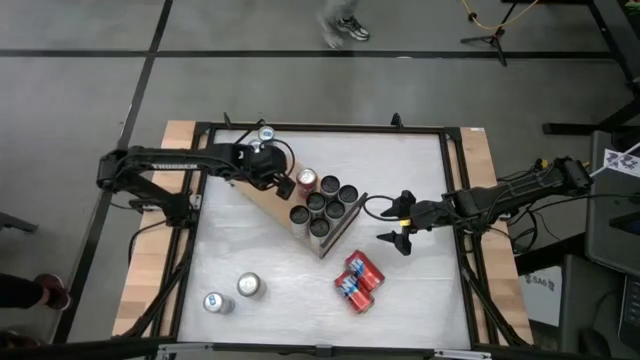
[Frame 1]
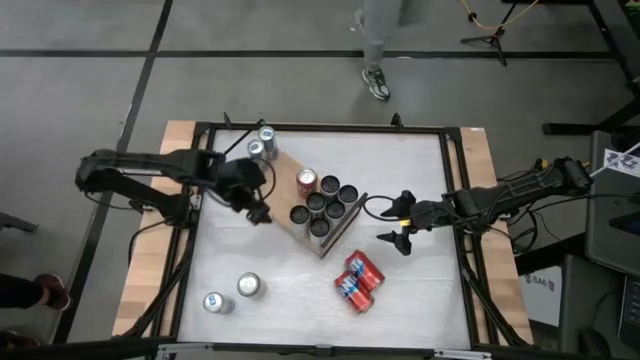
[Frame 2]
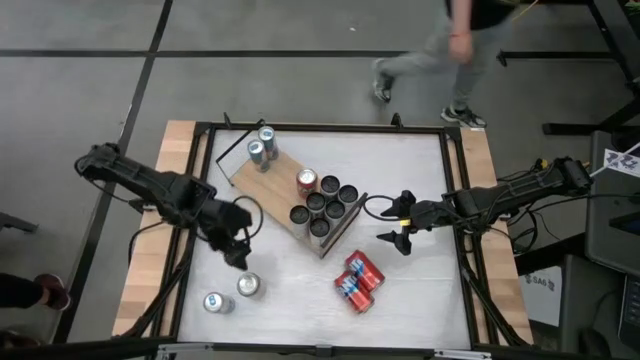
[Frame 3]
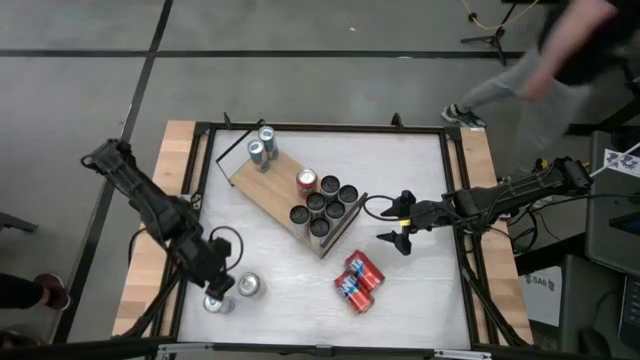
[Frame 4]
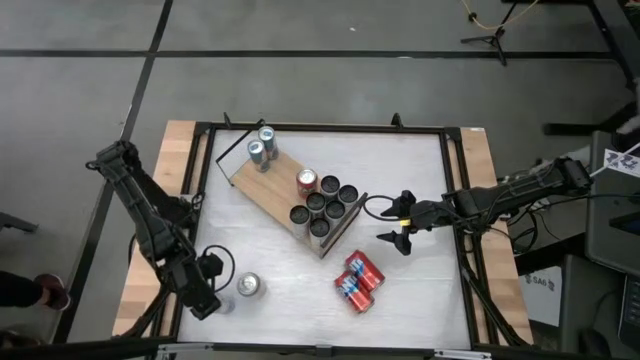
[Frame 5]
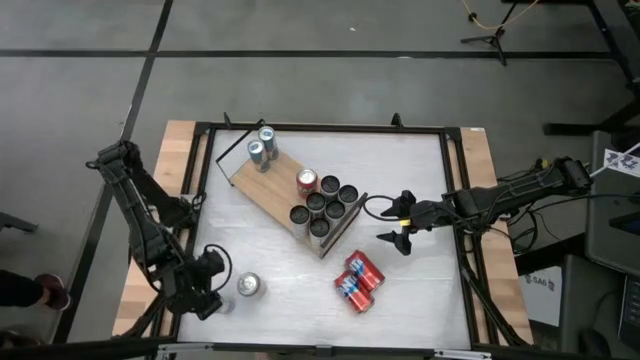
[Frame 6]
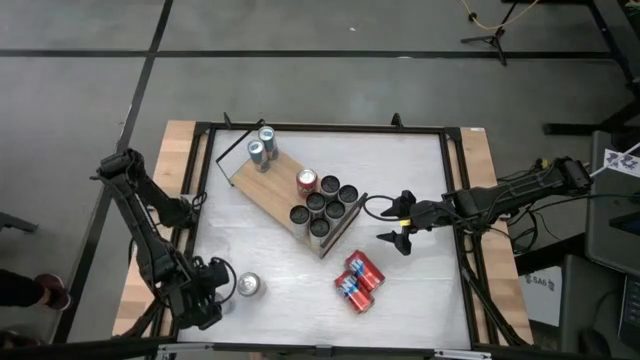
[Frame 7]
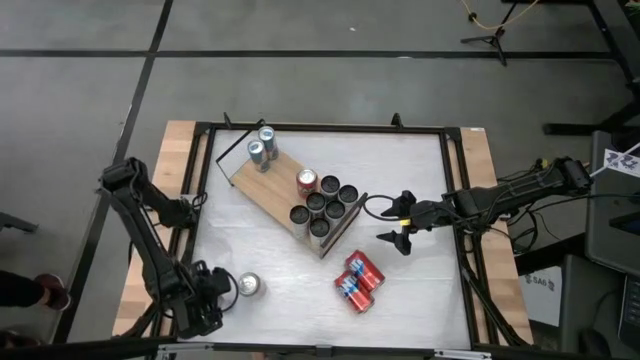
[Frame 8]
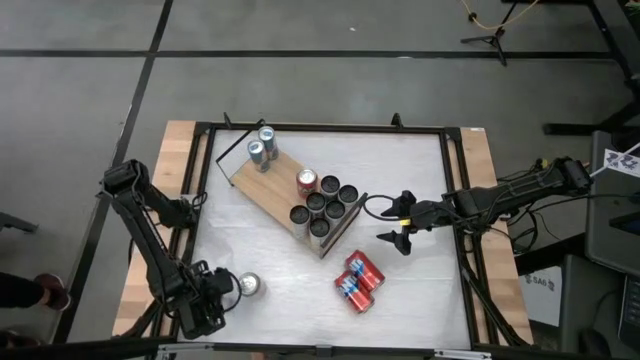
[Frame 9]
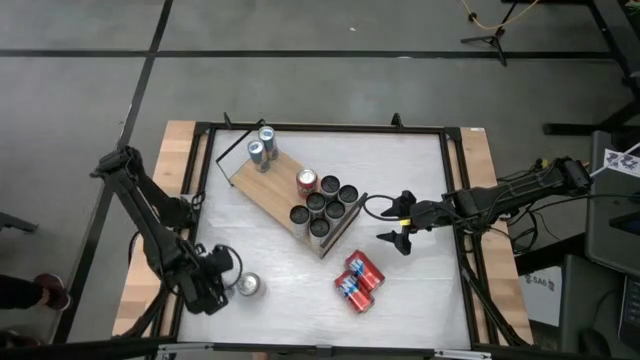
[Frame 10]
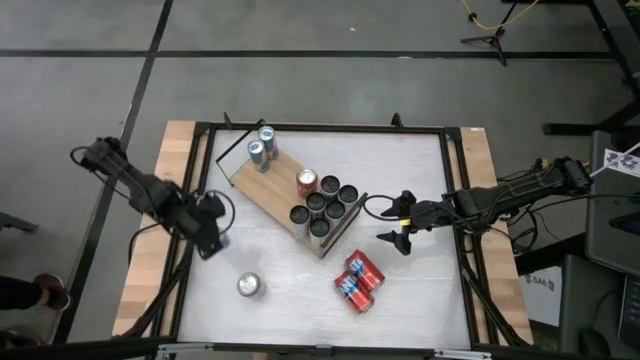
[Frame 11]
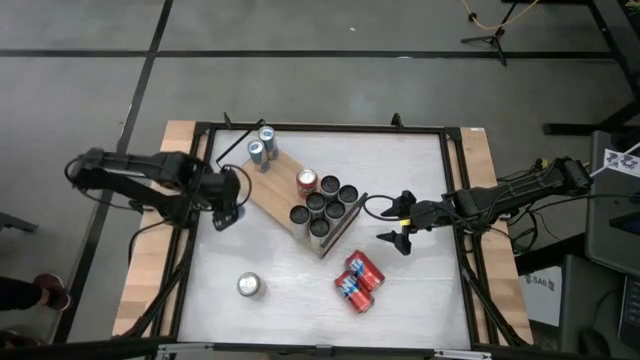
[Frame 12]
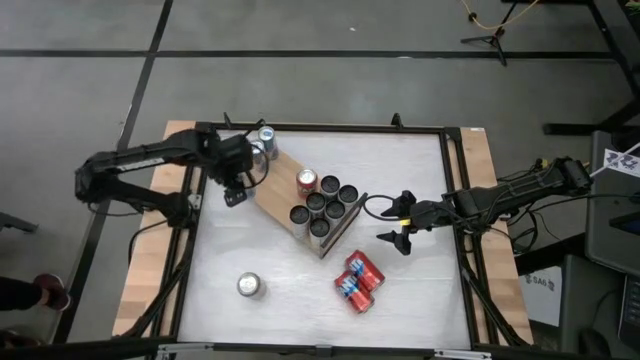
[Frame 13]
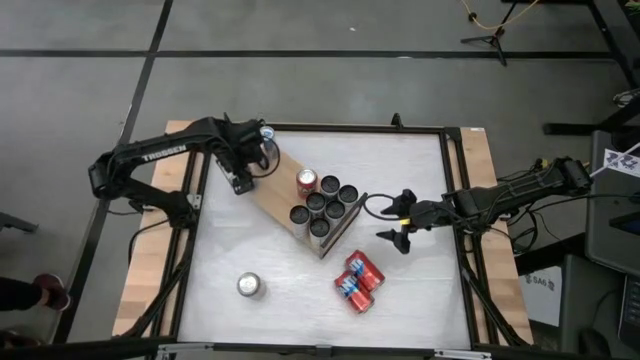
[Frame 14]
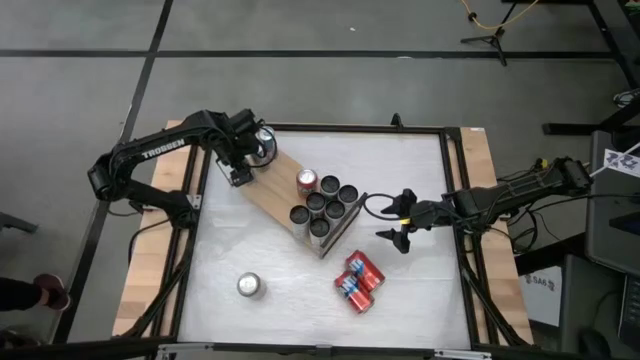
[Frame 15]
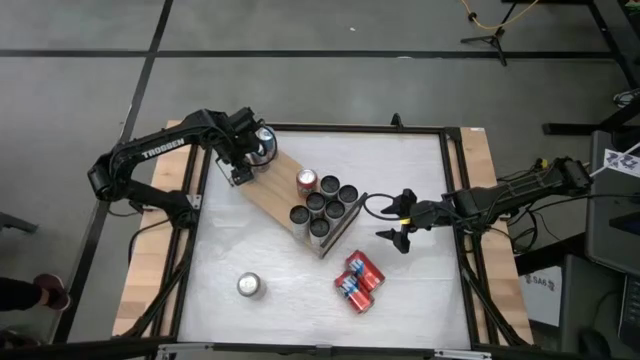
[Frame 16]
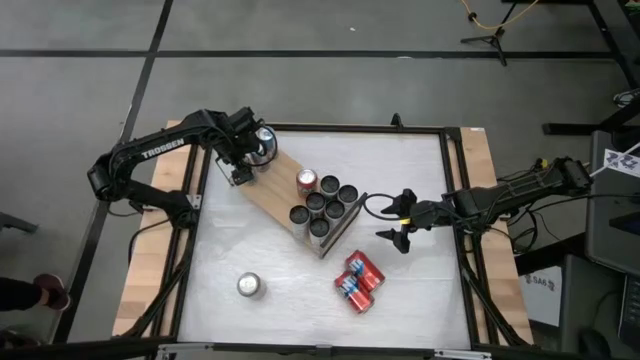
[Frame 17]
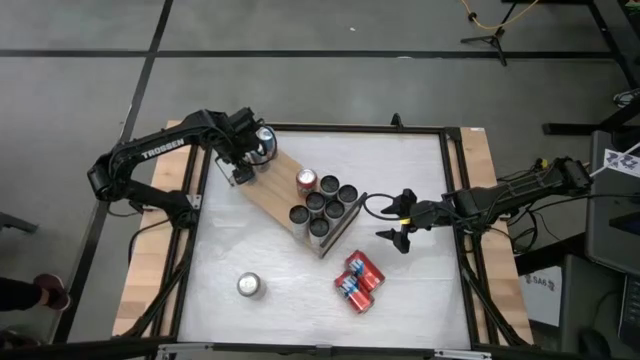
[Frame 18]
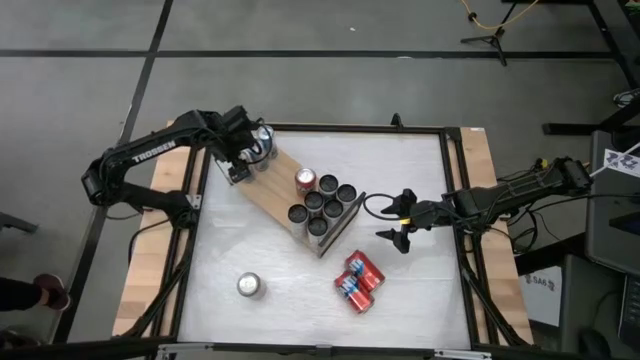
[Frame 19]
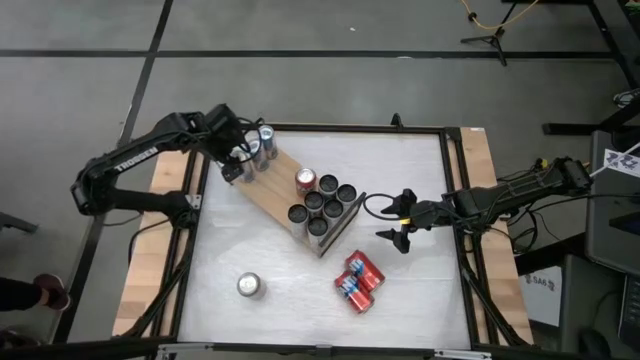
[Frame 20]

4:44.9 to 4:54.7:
Task: Place canned beverage on shelf
Put the blue soda can on the shelf aligned with the other blue soda cans

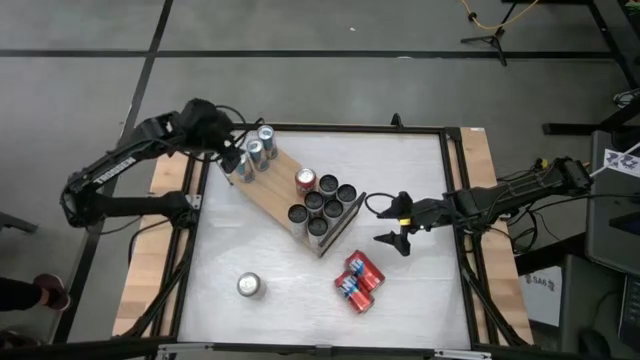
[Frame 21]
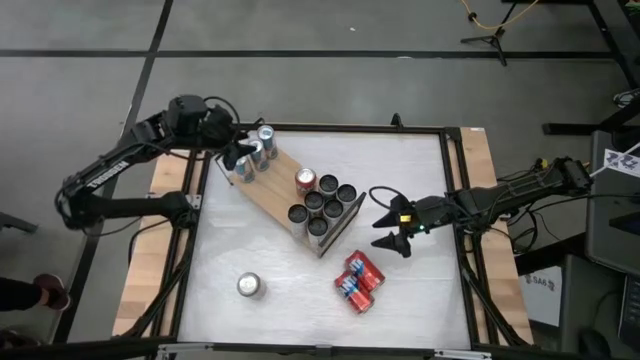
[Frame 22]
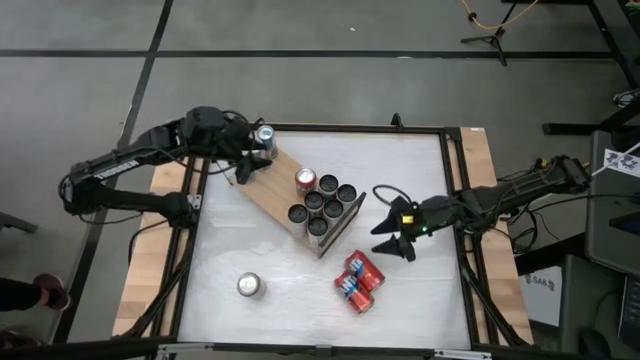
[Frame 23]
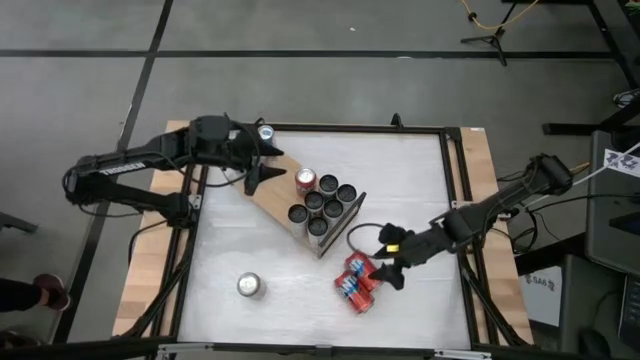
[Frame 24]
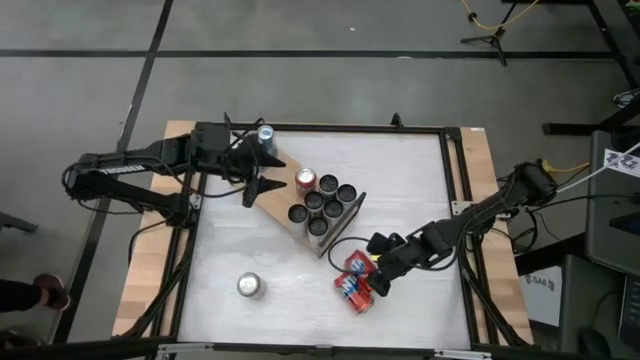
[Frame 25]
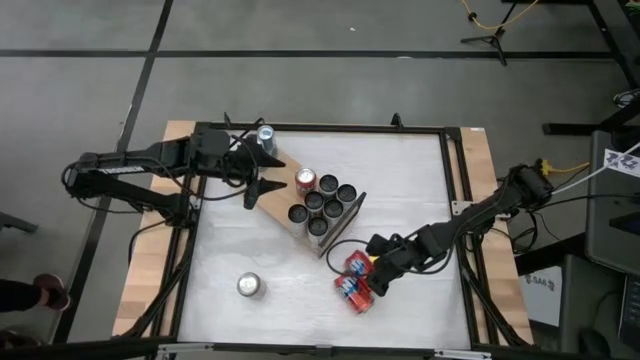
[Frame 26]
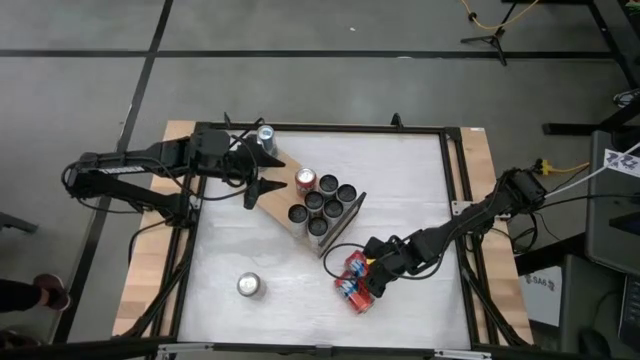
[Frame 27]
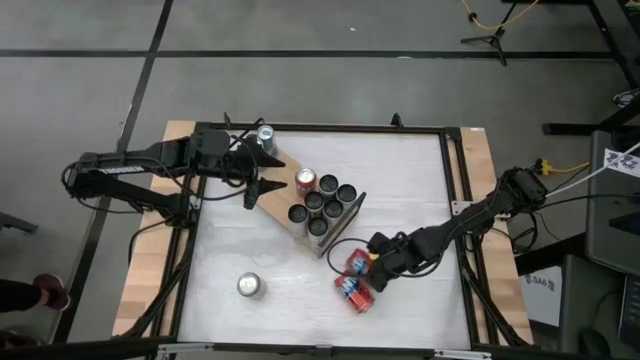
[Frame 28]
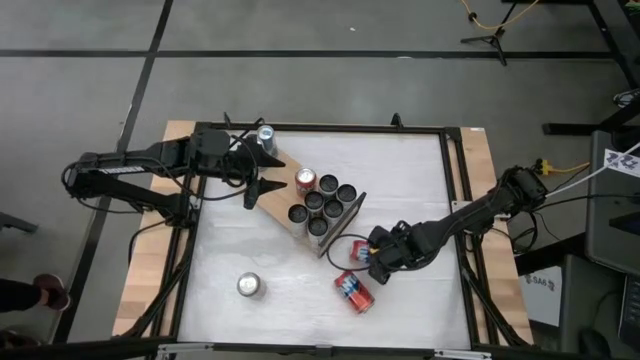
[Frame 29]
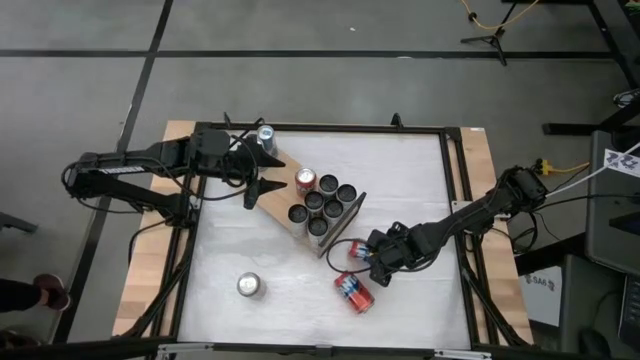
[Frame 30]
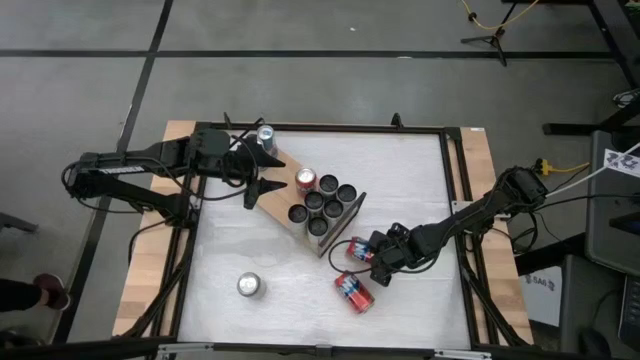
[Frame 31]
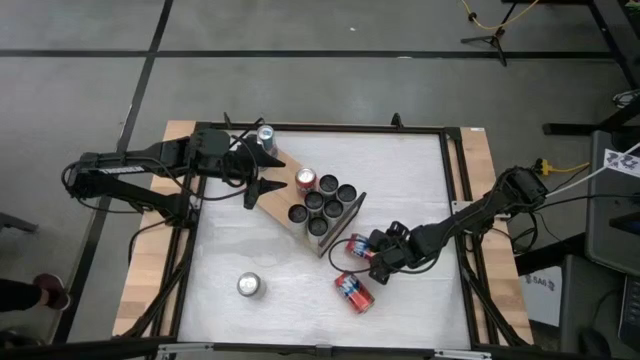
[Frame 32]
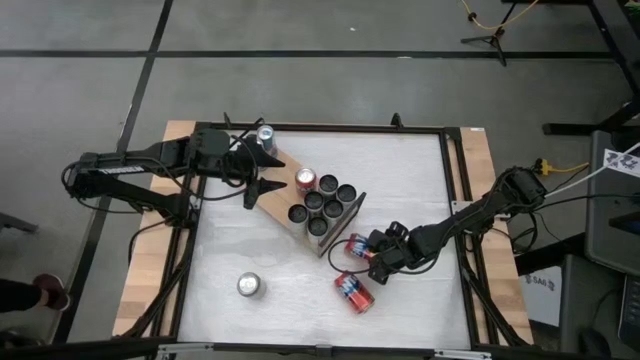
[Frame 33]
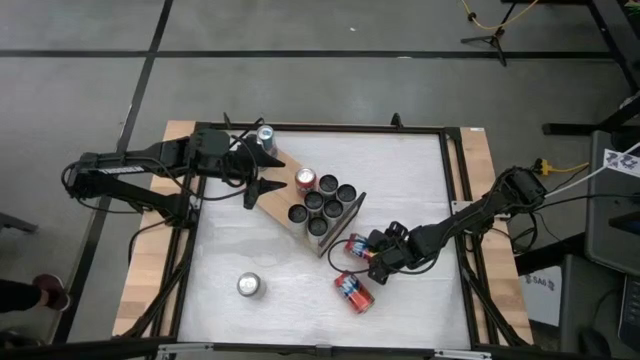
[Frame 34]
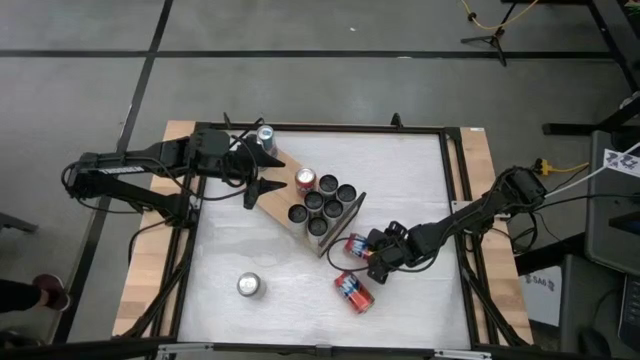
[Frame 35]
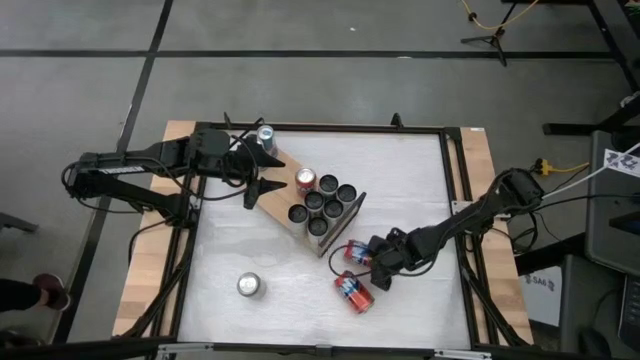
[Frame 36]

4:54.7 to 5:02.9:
Put the top red soda can on the shelf aligned with the other red soda can
